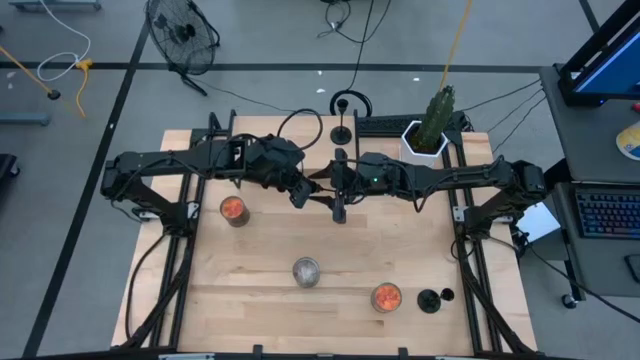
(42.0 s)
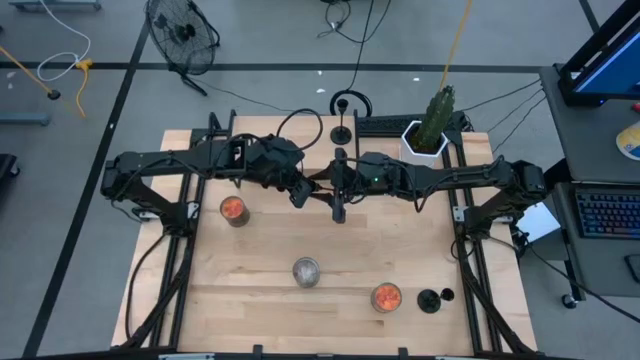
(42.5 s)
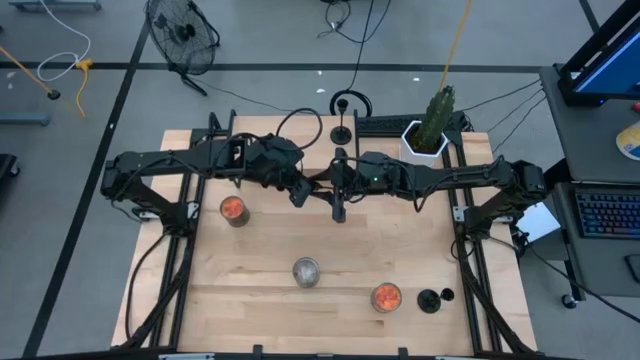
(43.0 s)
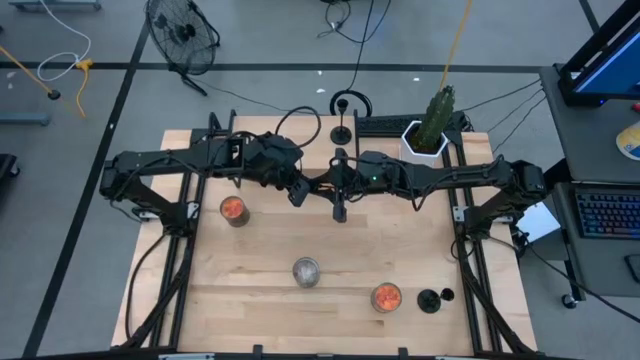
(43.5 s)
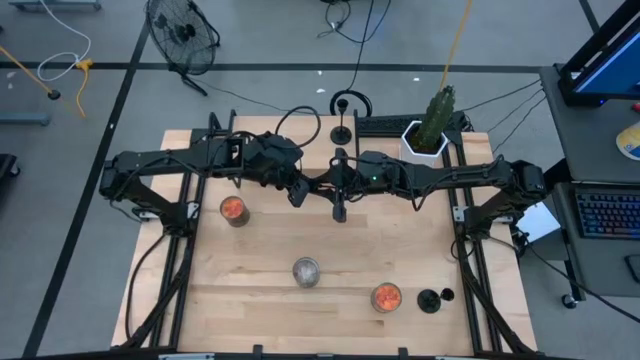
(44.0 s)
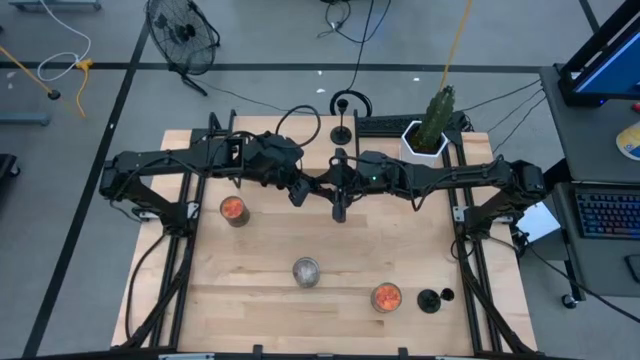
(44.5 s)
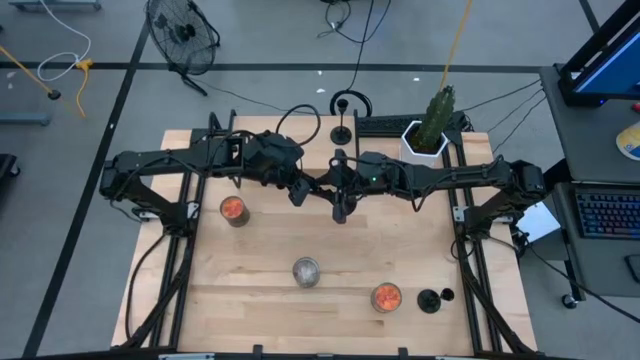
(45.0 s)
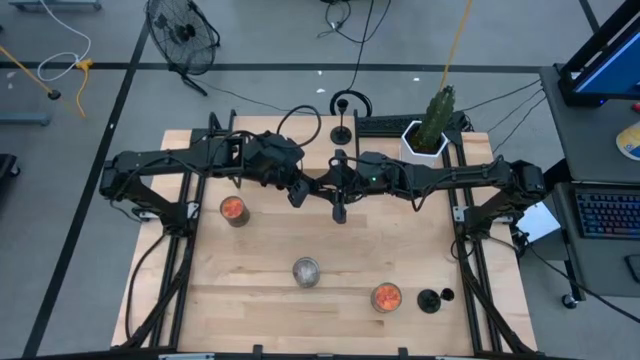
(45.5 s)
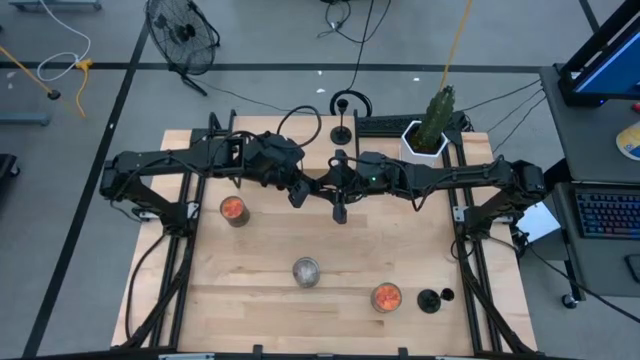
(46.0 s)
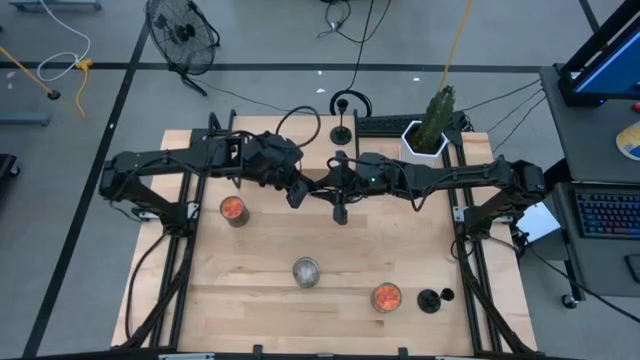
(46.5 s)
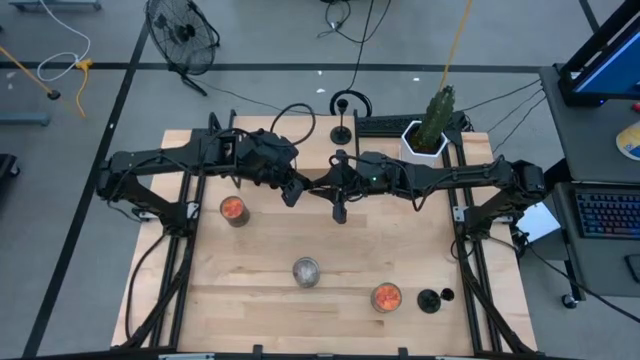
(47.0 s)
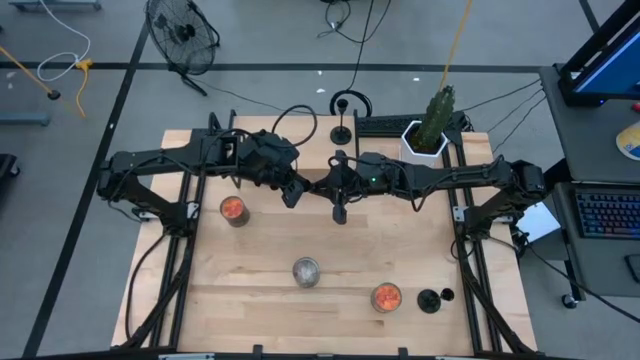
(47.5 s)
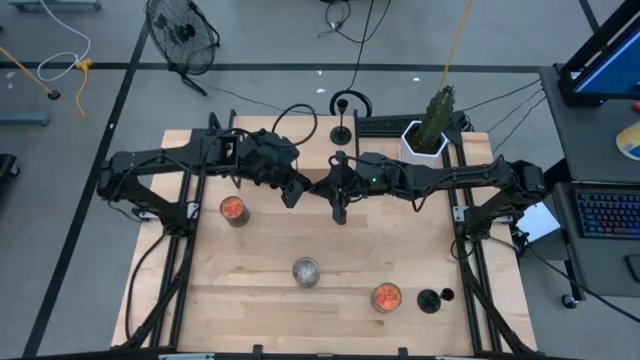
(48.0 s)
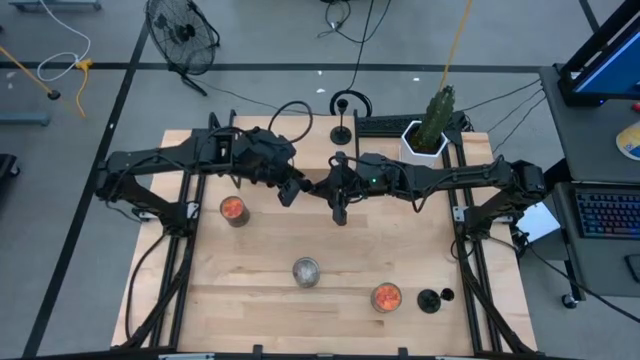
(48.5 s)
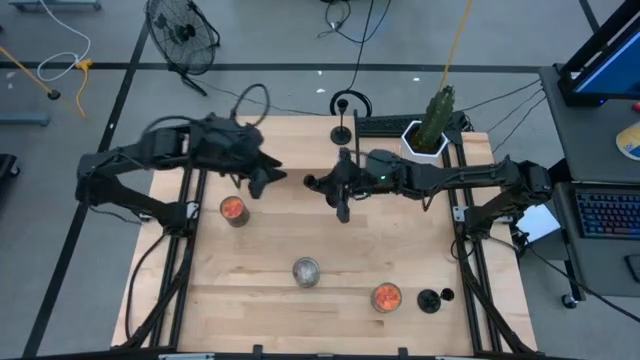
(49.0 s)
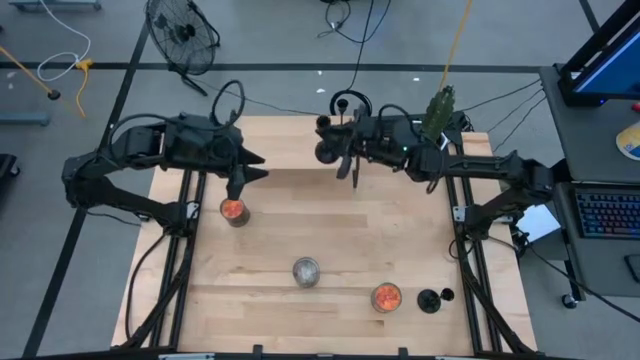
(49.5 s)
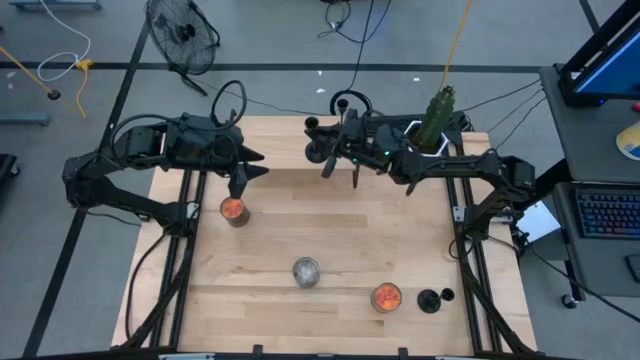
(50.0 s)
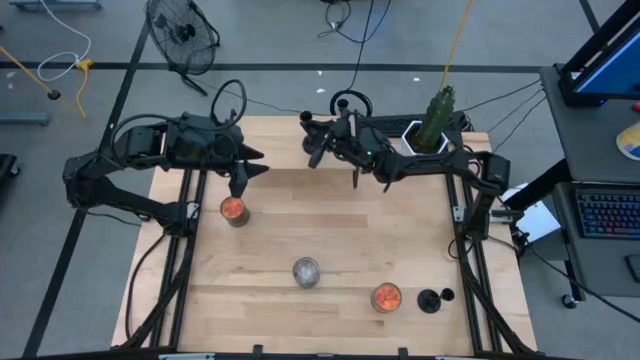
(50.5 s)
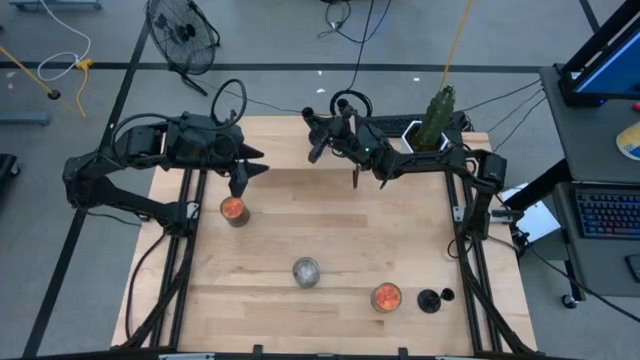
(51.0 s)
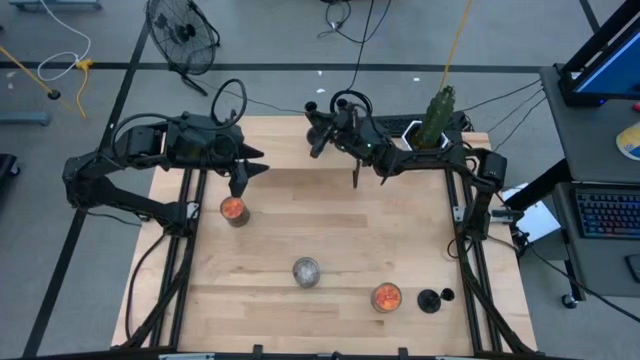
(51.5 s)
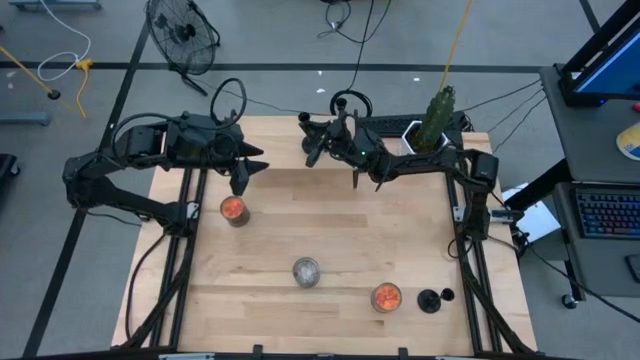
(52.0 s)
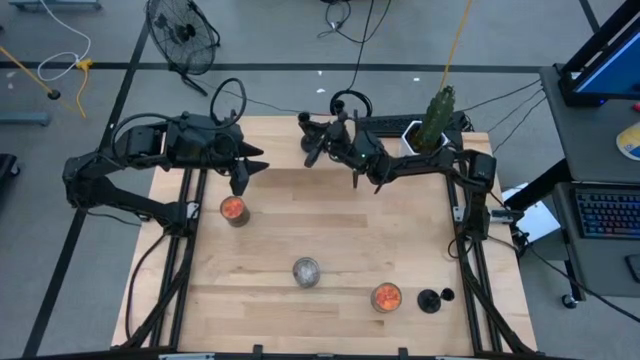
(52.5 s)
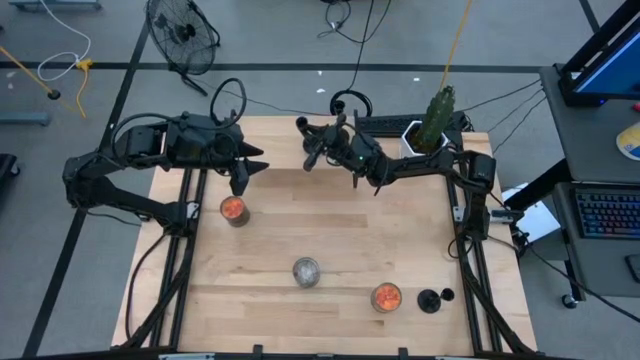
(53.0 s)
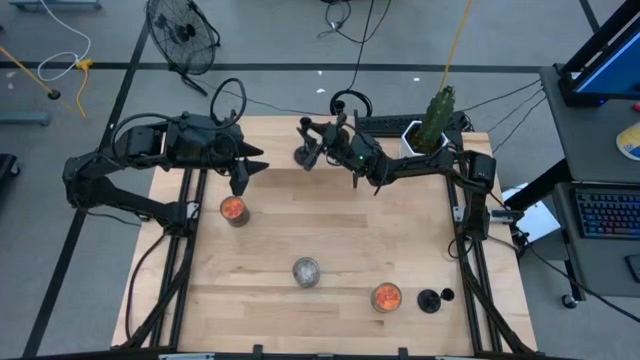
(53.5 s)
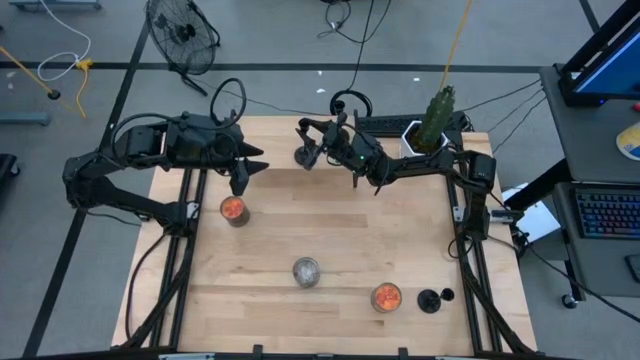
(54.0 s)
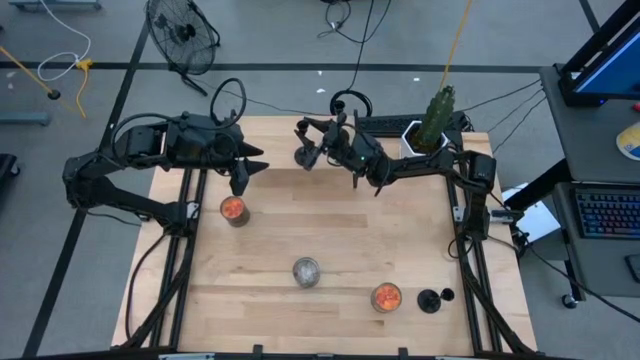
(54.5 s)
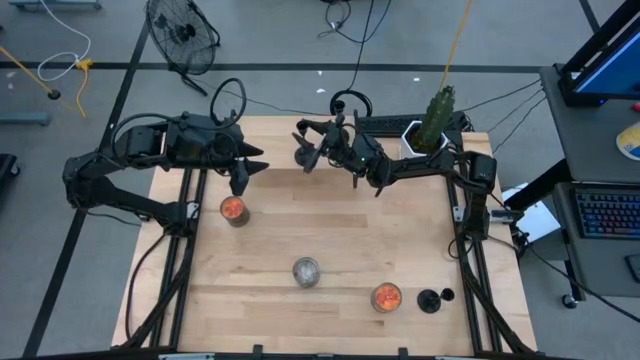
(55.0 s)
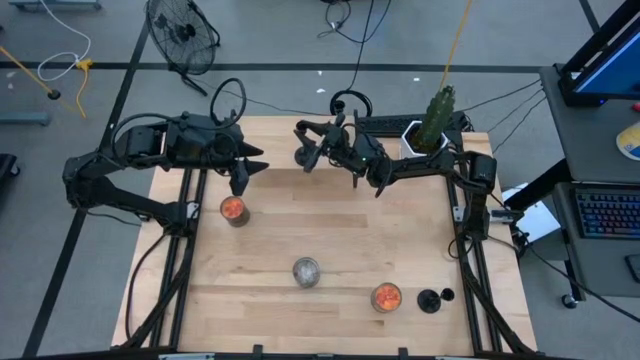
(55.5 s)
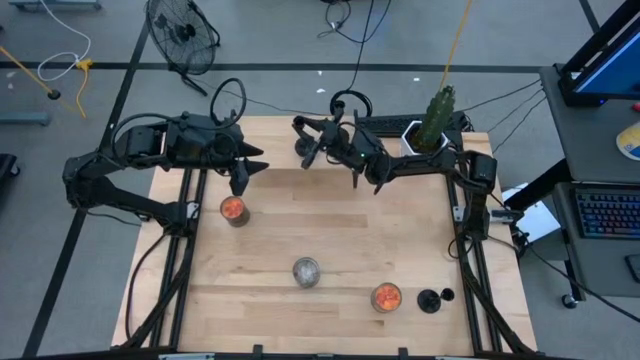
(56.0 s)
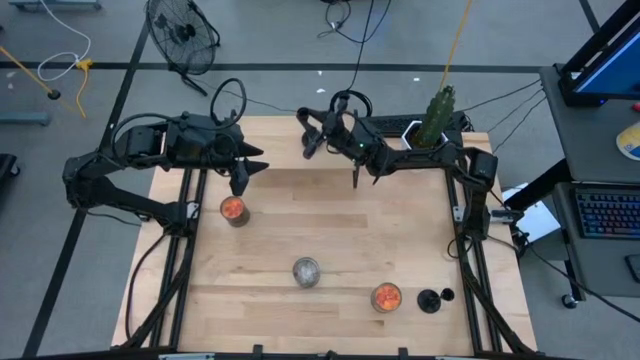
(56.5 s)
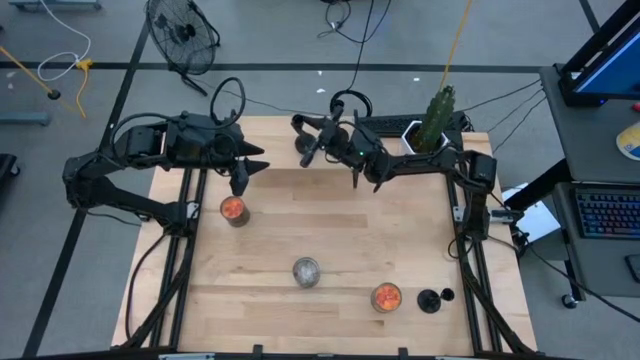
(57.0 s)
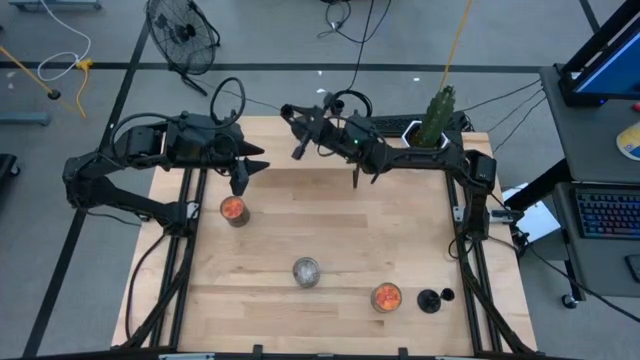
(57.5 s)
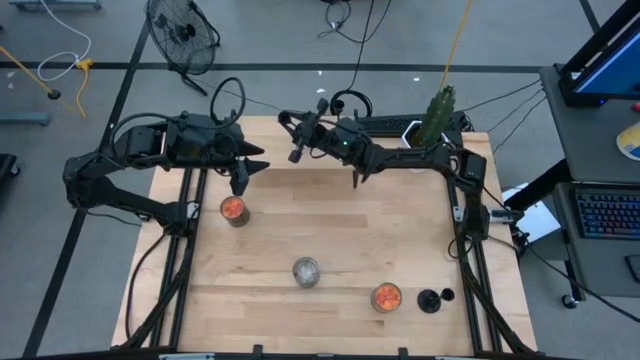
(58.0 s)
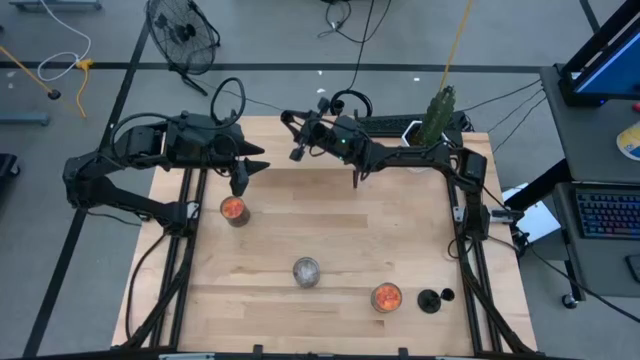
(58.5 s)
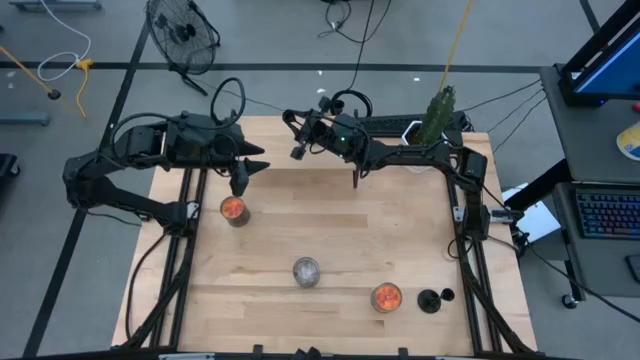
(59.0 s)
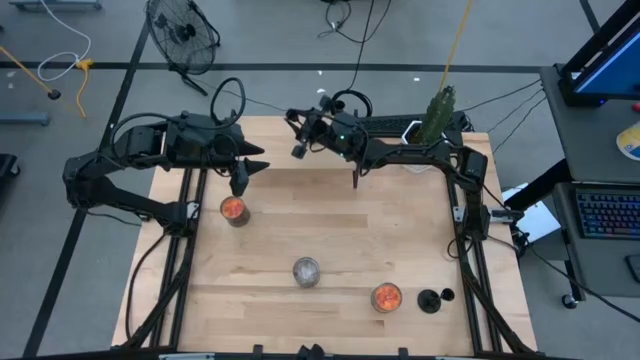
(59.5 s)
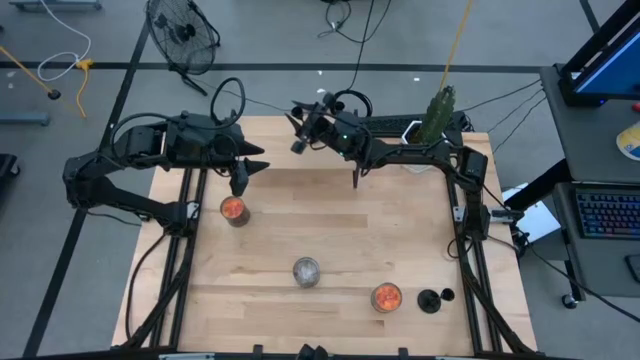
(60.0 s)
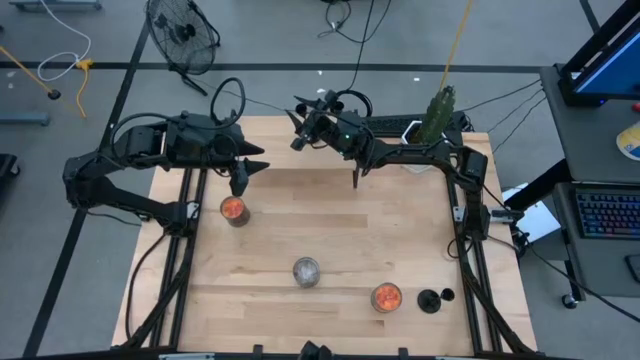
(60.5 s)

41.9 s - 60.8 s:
Task: Pick & Place candle stick holders
Put the left black candle holder on the shelf

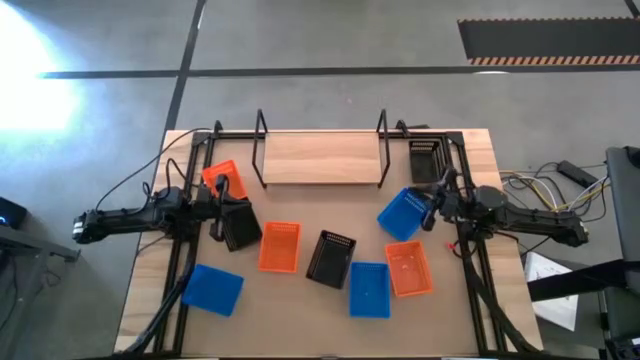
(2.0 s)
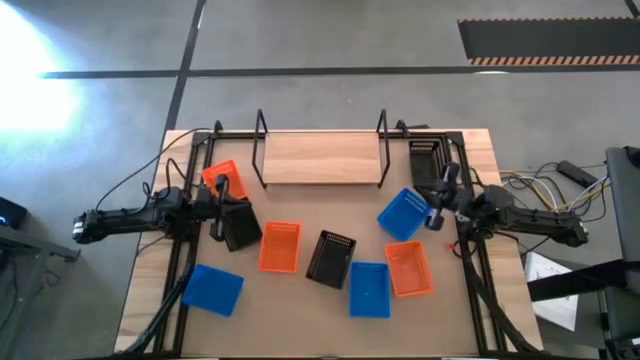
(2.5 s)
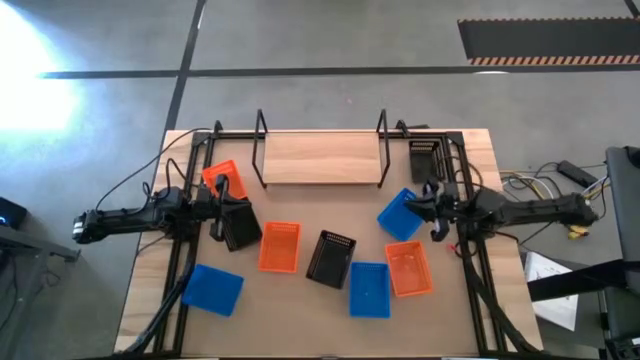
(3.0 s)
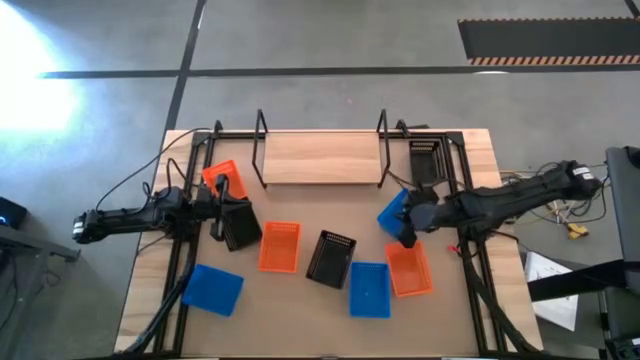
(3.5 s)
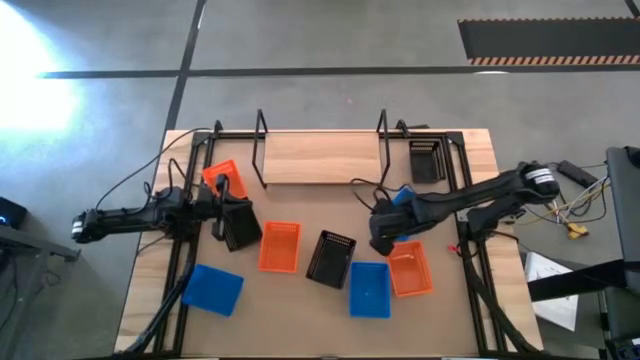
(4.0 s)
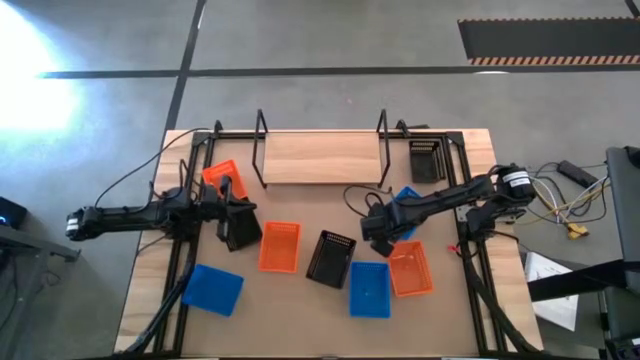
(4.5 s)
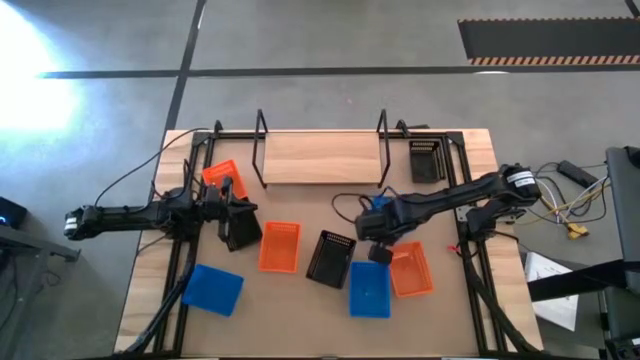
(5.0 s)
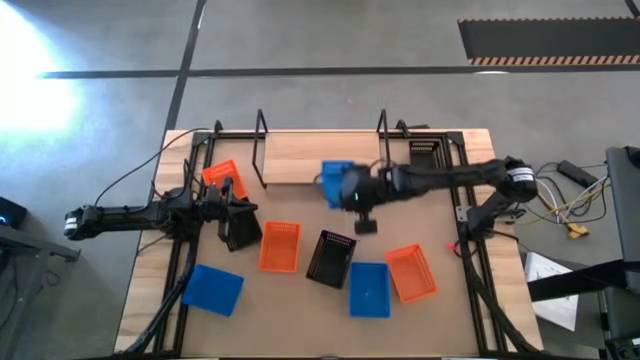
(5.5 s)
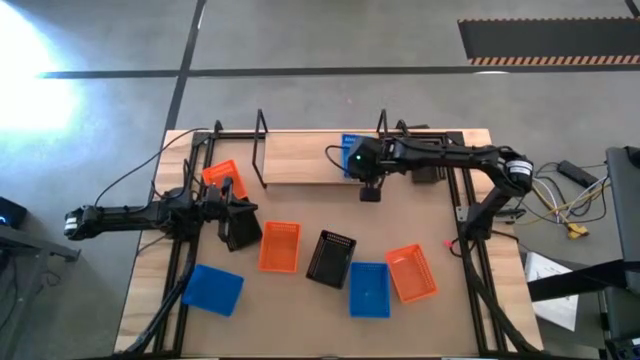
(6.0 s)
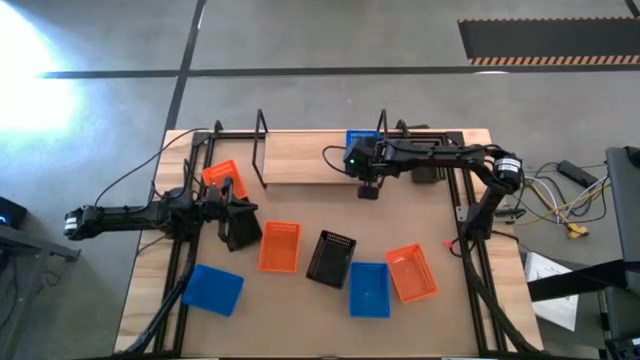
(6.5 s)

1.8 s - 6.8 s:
Task: Stack baskets on shelf by color
Put the top blue bin on the shelf
